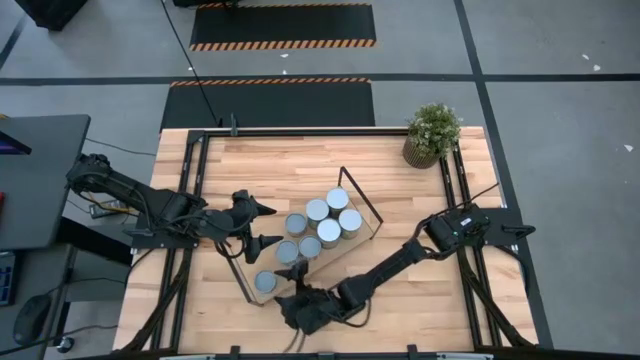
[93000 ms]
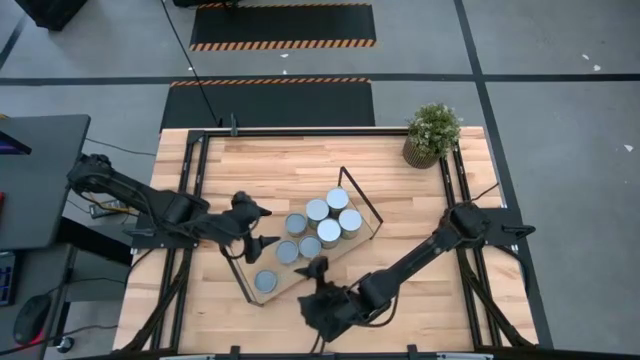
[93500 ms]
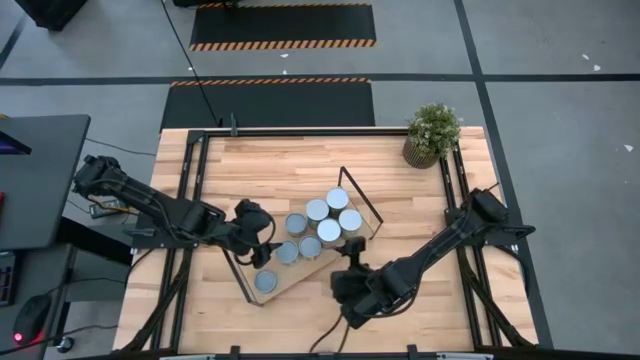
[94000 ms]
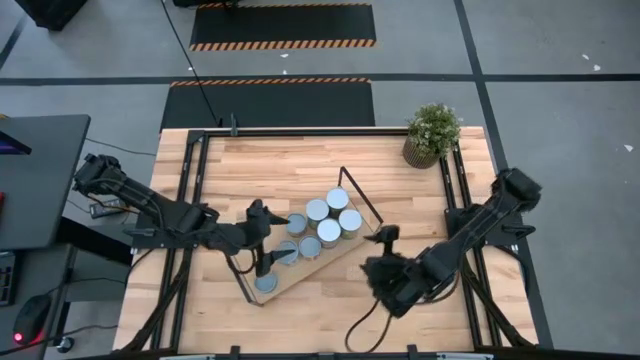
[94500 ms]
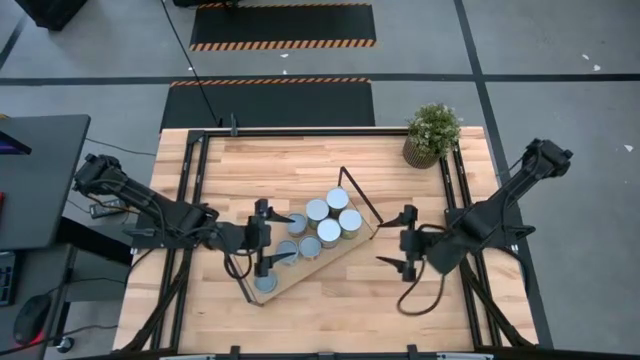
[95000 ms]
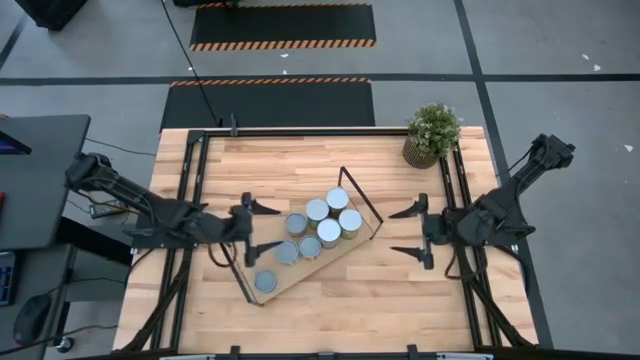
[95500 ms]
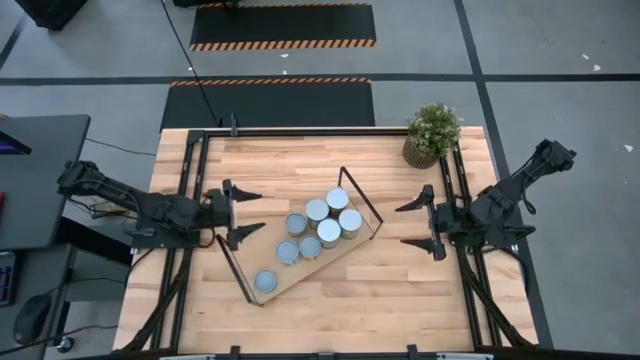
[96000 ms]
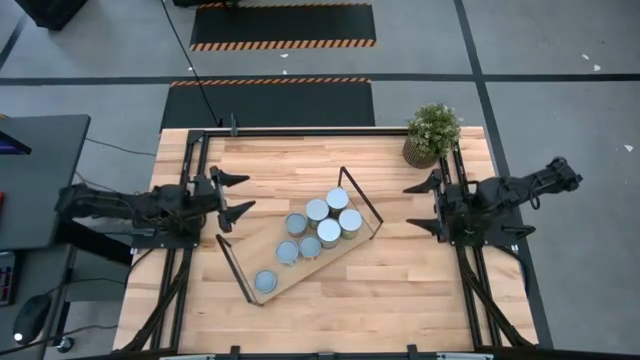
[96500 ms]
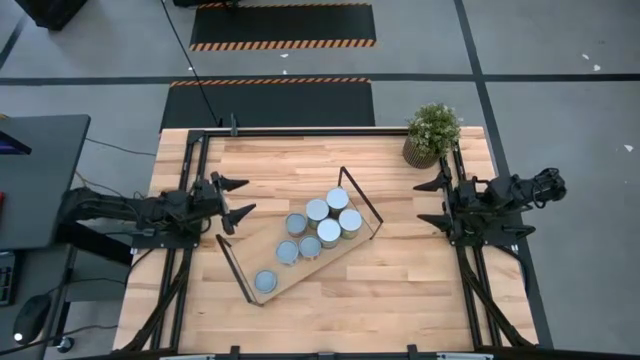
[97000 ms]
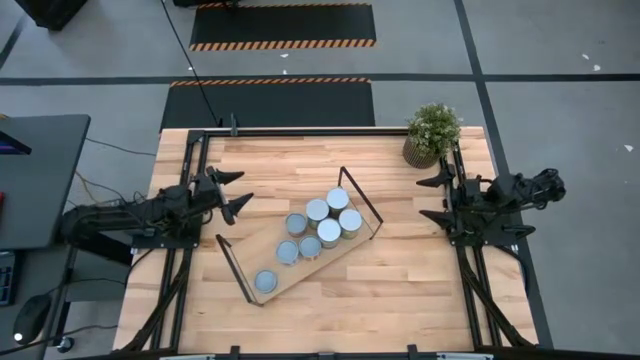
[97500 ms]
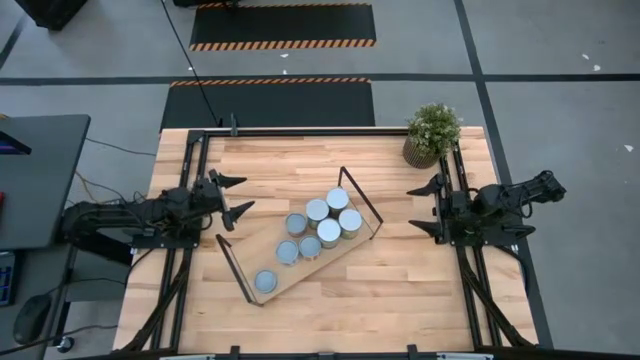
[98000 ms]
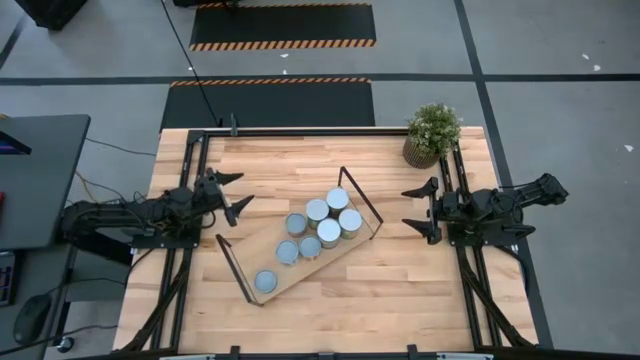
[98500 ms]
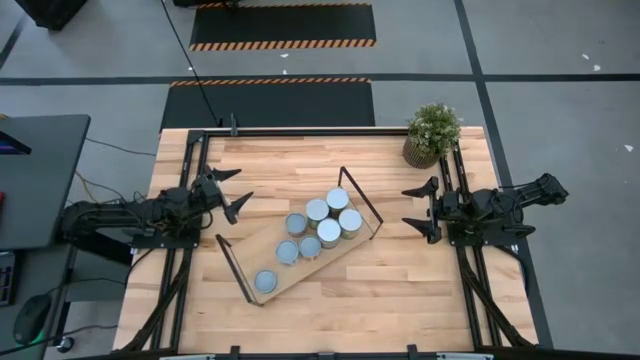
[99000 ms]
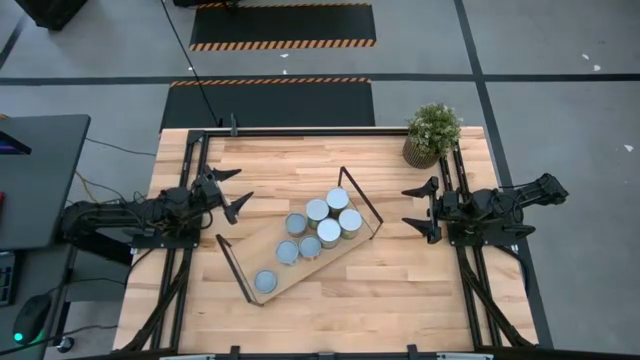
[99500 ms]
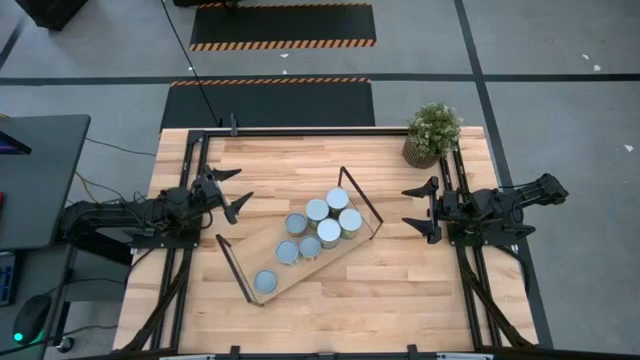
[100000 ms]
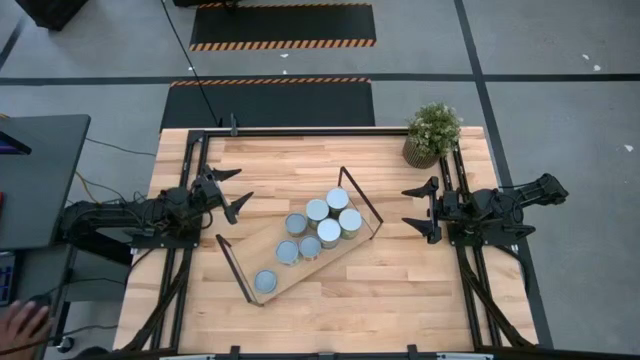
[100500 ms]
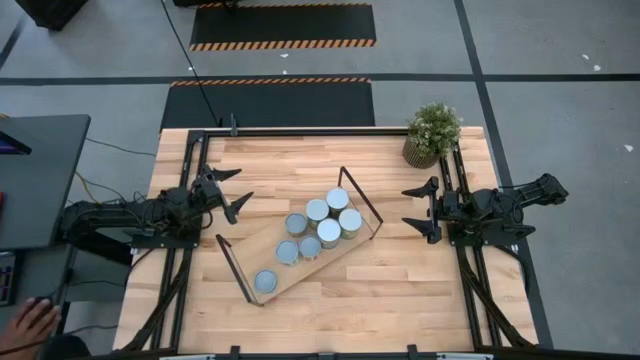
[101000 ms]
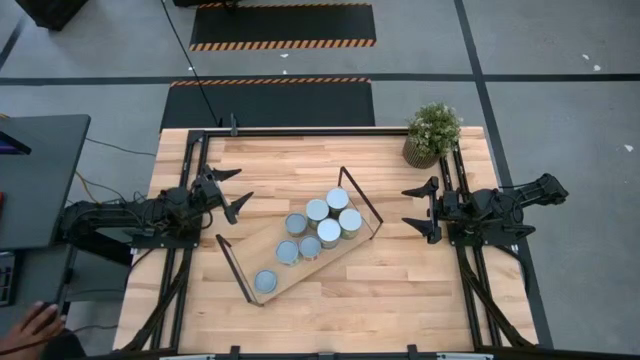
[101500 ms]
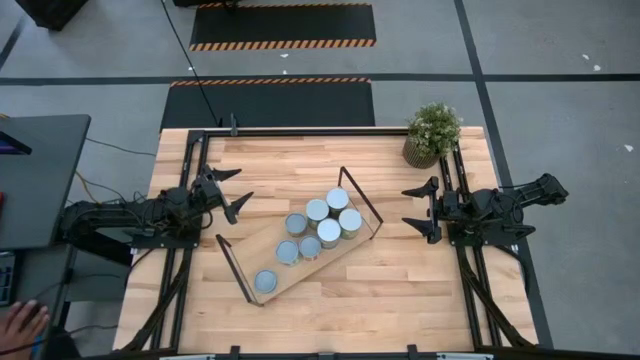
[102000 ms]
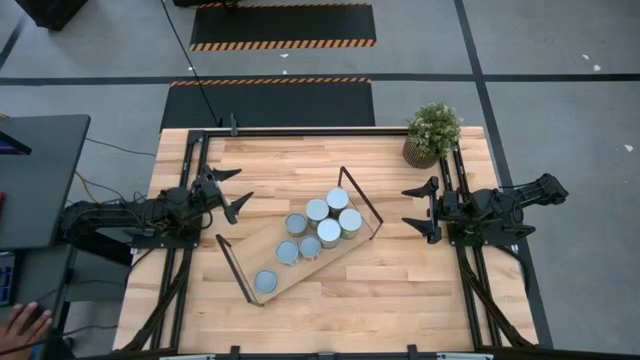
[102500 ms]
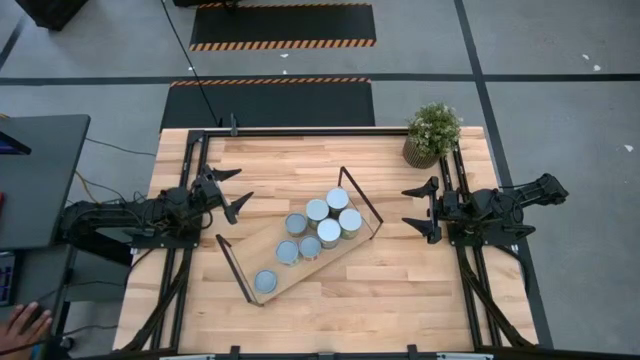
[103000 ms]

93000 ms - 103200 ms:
Task: Pick and place cans onto a shelf
Return to Home Position

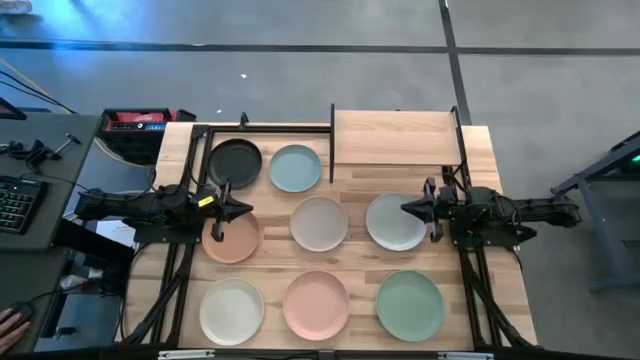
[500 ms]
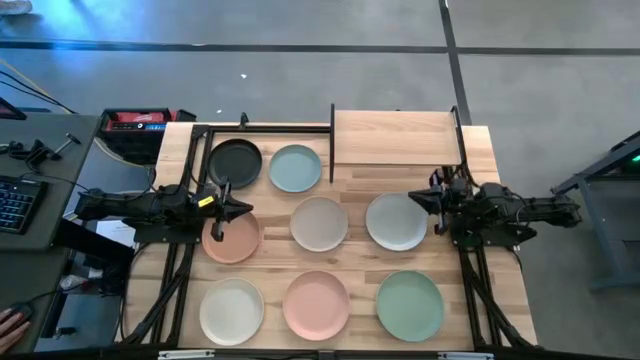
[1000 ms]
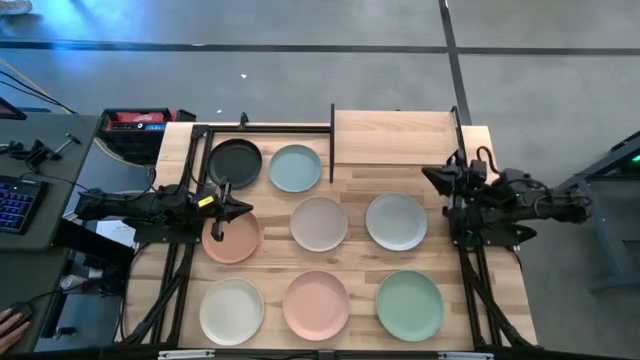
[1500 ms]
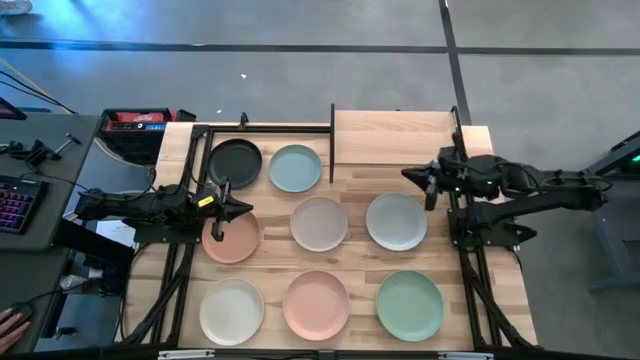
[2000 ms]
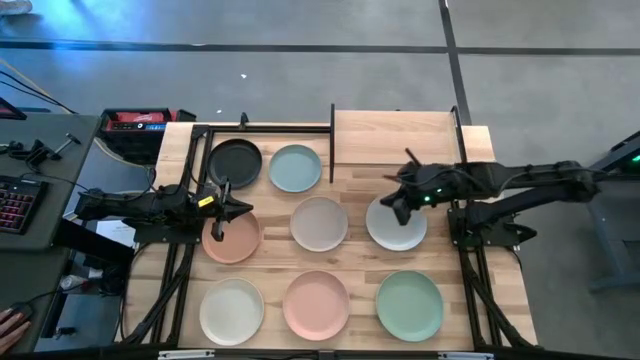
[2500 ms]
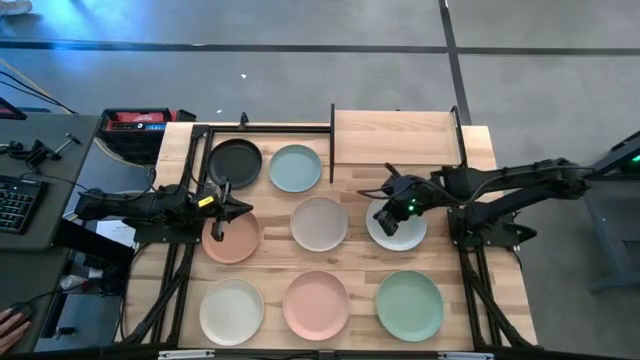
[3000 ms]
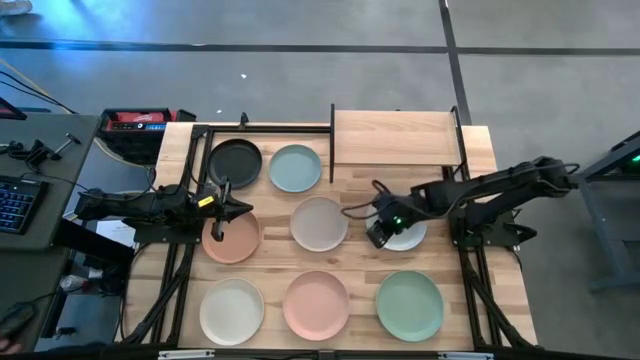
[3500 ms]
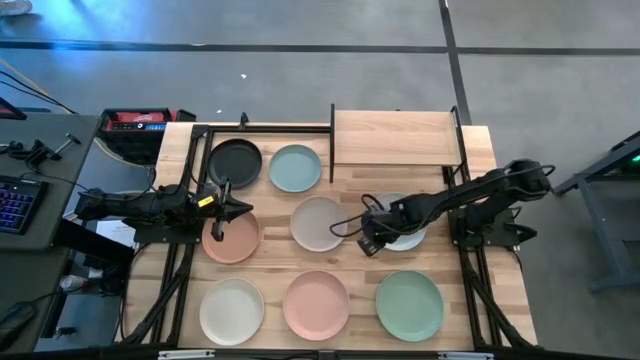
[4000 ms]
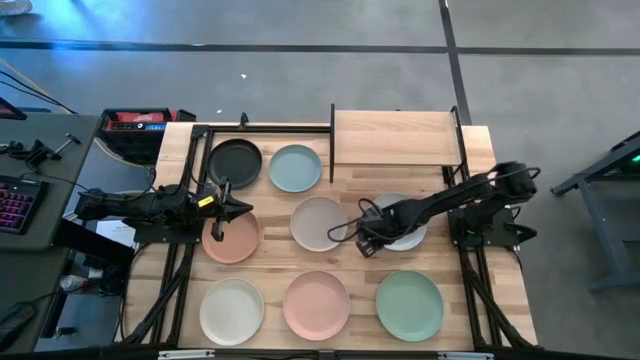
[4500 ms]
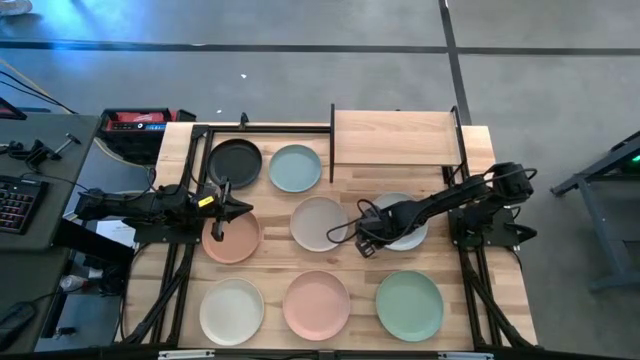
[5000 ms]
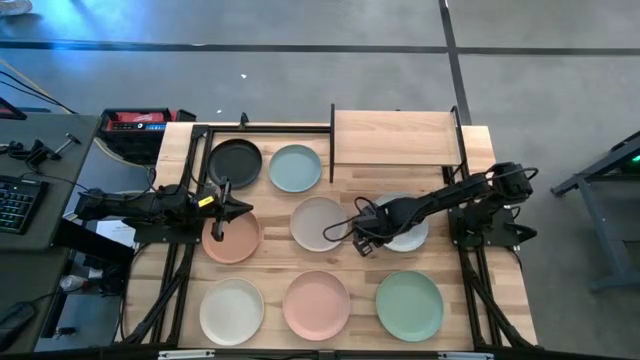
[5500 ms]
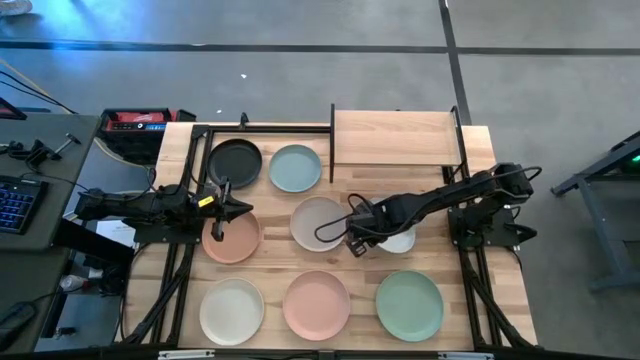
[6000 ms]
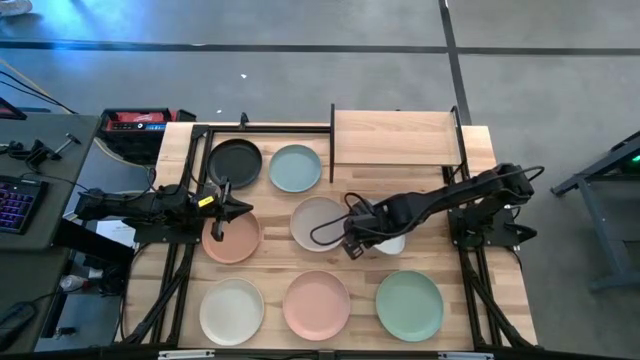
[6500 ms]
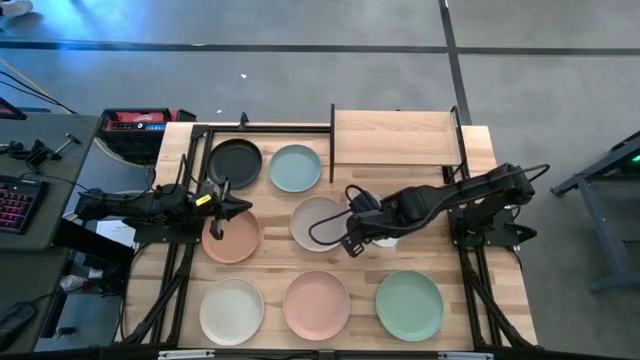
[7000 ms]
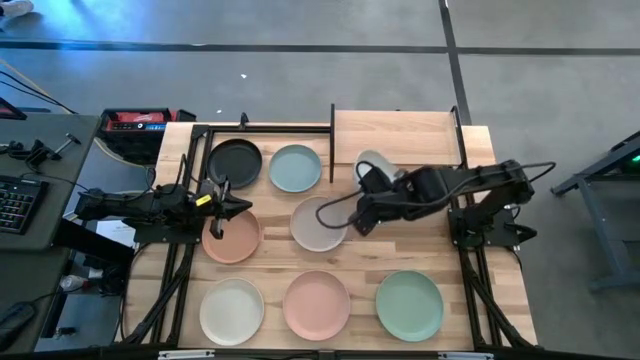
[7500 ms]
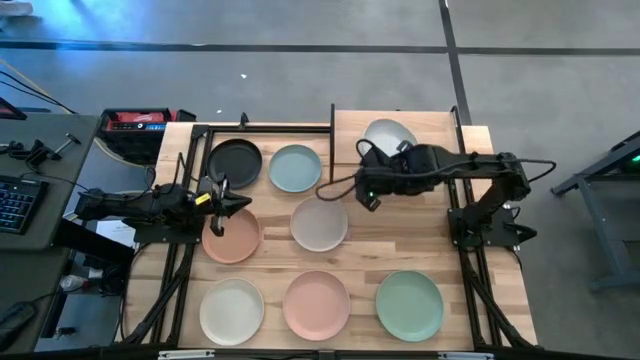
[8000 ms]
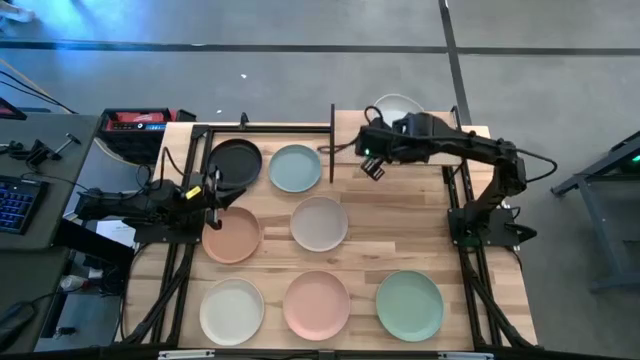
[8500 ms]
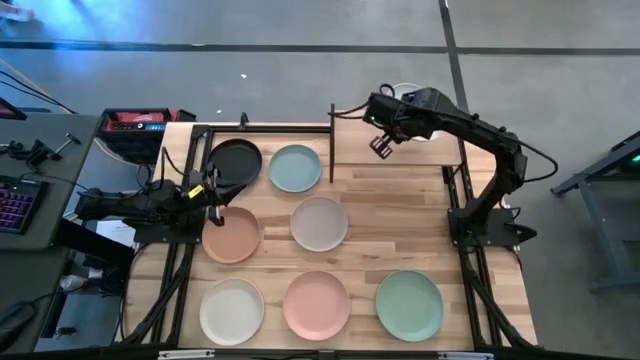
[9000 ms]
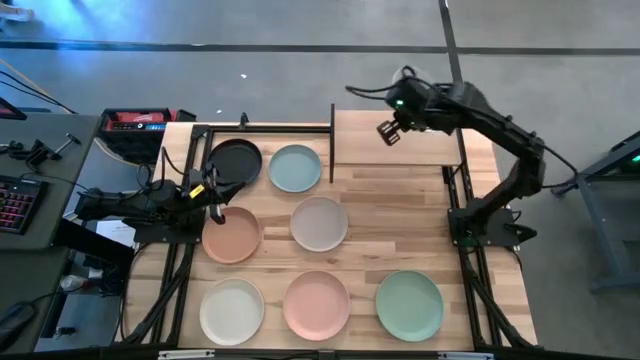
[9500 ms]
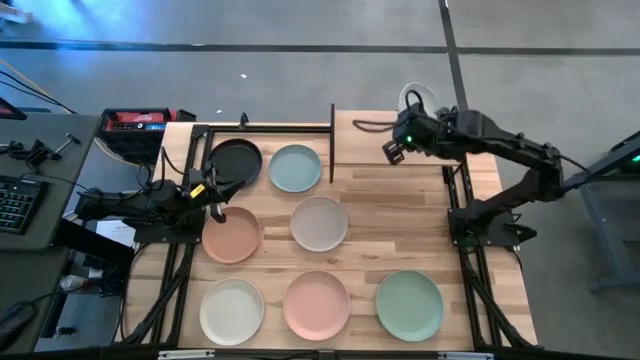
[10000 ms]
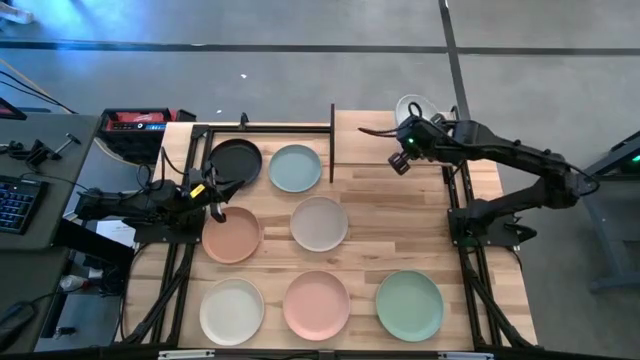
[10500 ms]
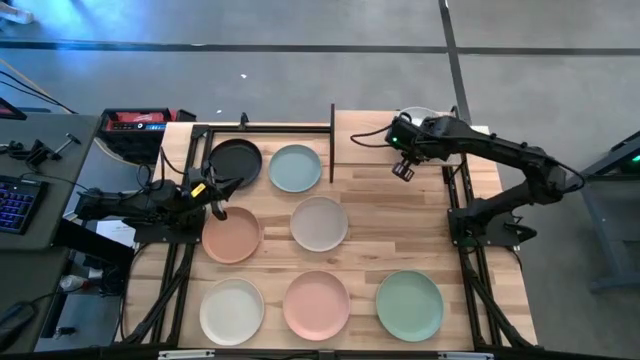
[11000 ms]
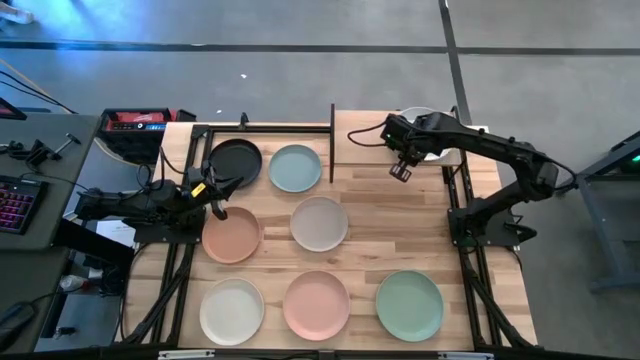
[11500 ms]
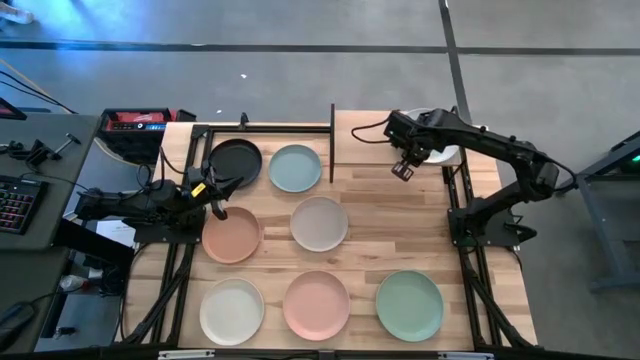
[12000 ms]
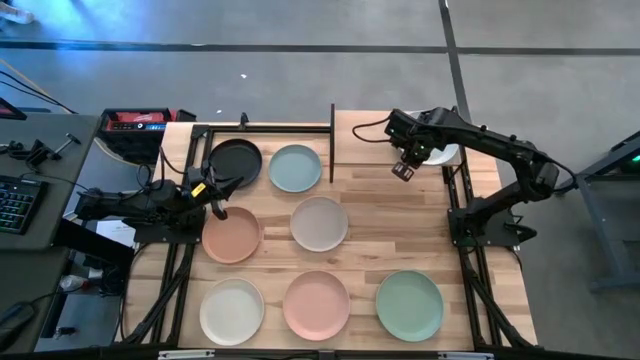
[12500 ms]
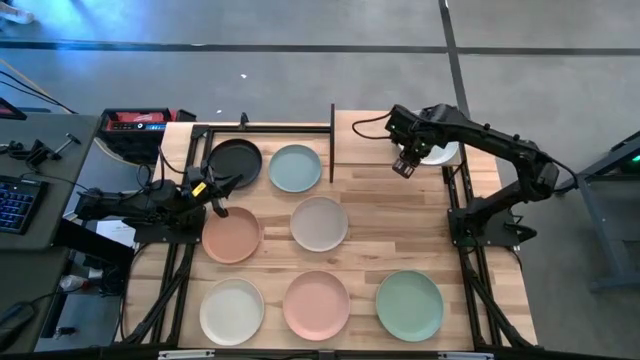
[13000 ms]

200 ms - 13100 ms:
Task: Place and stack plates onto a shelf
Put the top right white plate on the shelf
